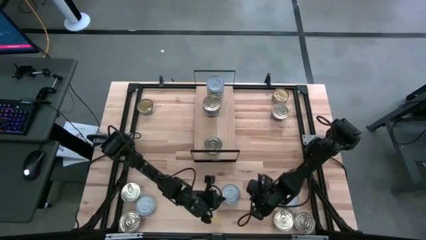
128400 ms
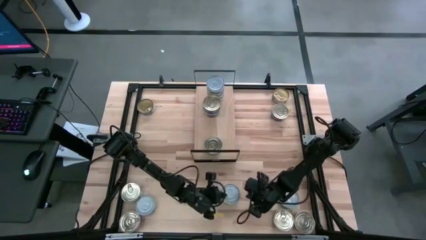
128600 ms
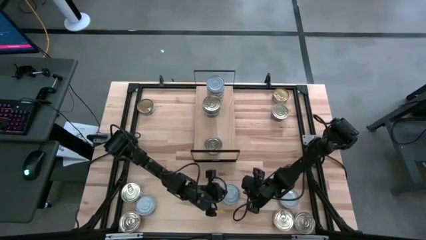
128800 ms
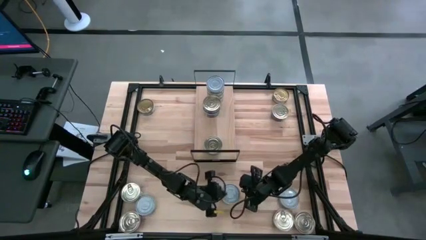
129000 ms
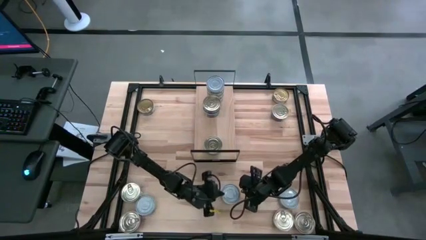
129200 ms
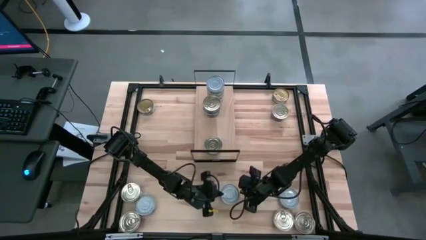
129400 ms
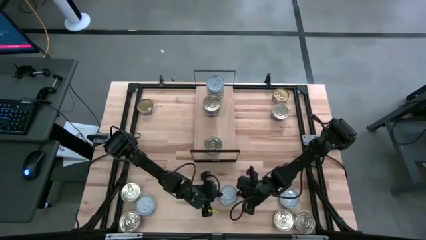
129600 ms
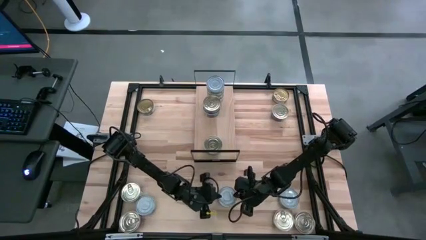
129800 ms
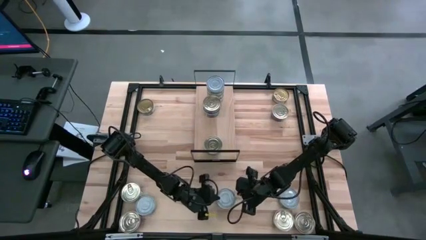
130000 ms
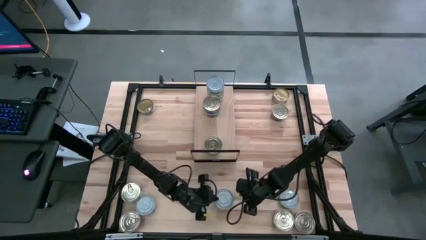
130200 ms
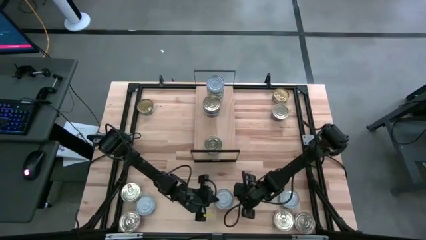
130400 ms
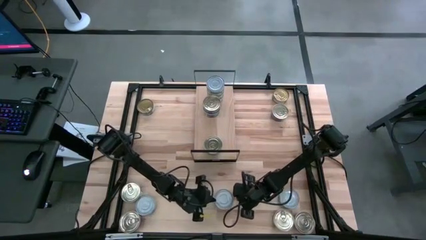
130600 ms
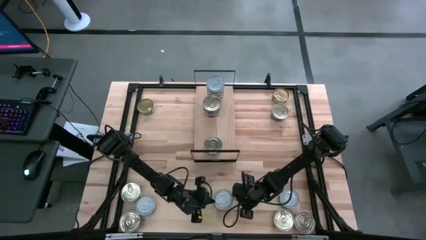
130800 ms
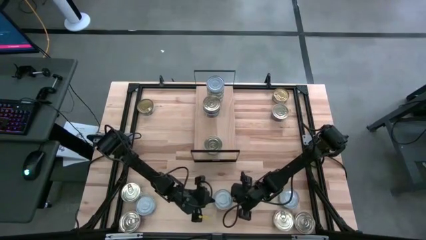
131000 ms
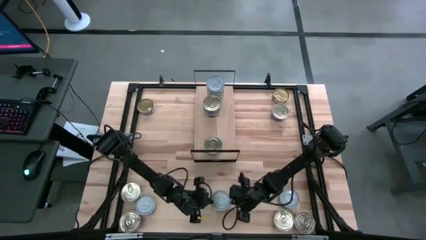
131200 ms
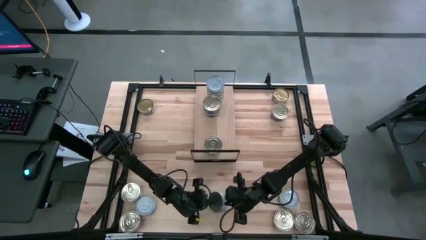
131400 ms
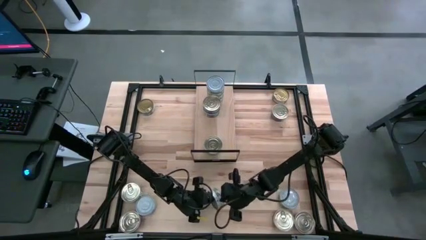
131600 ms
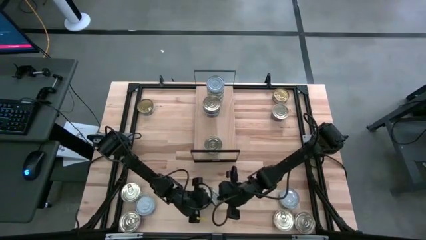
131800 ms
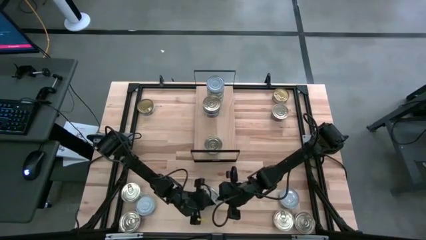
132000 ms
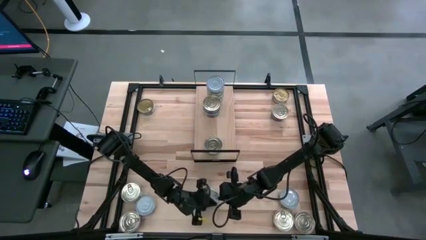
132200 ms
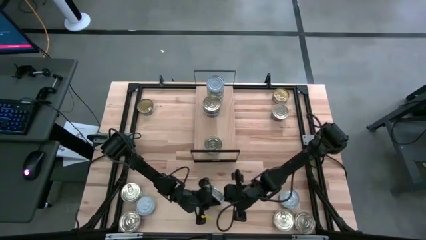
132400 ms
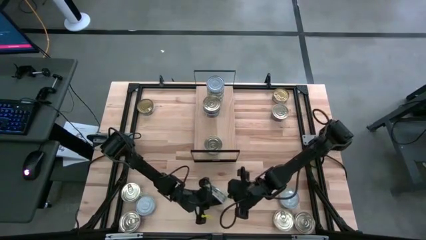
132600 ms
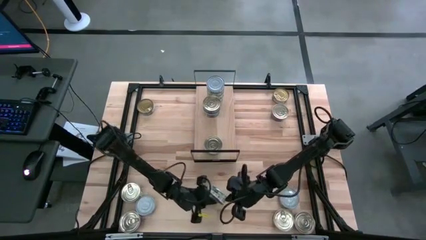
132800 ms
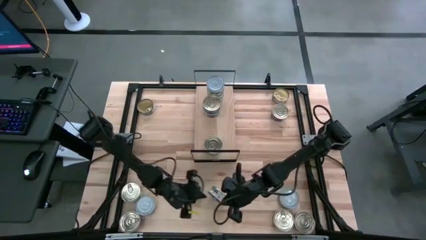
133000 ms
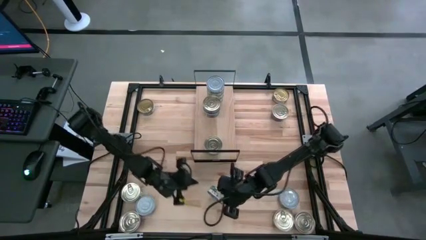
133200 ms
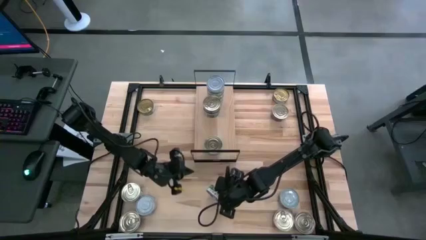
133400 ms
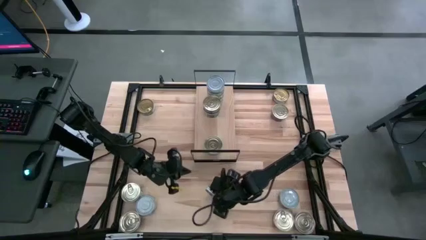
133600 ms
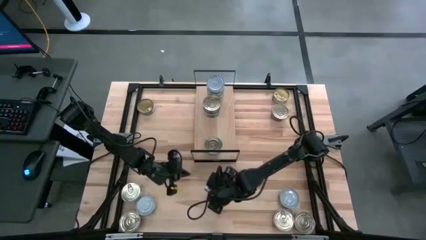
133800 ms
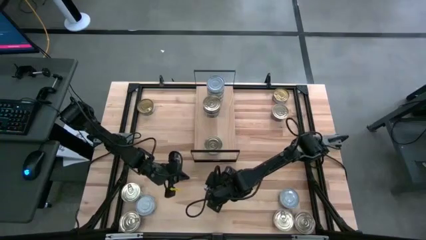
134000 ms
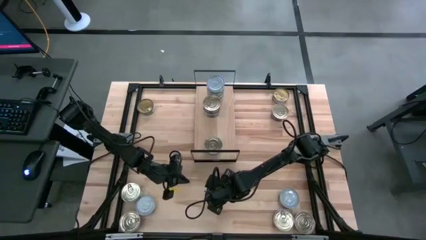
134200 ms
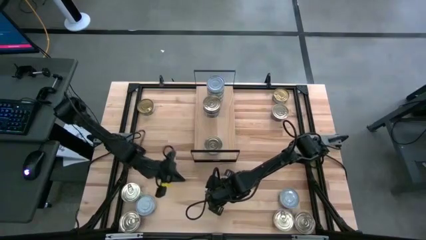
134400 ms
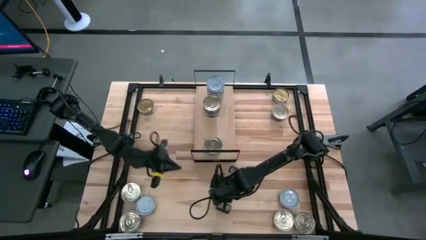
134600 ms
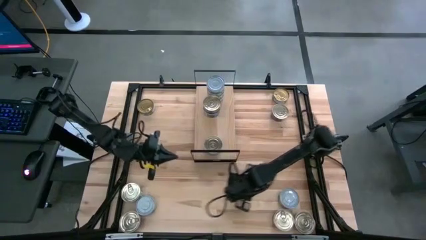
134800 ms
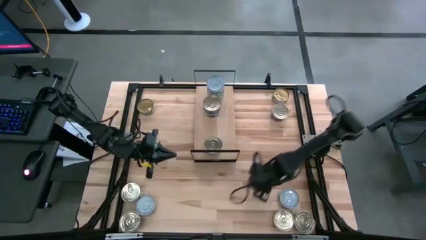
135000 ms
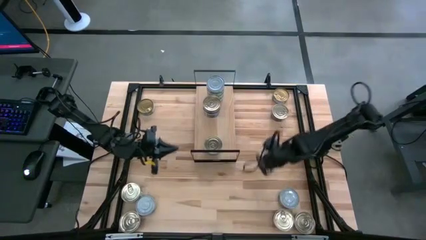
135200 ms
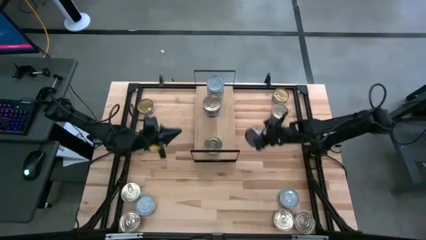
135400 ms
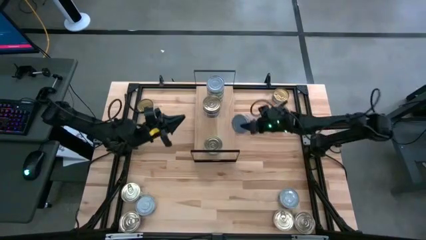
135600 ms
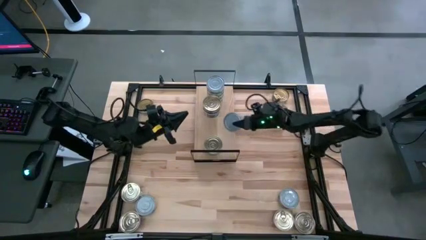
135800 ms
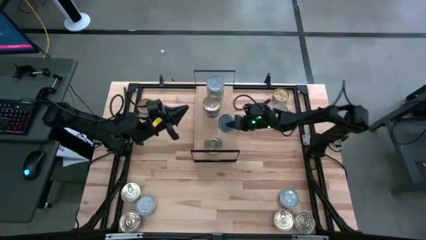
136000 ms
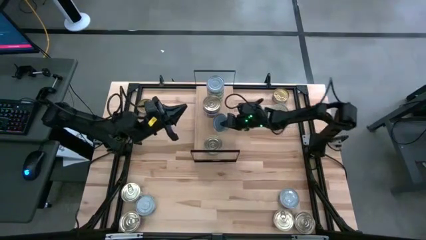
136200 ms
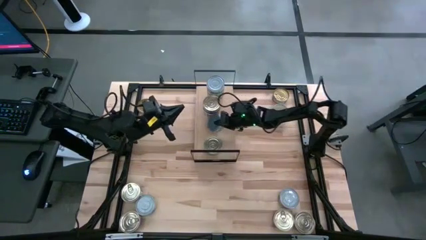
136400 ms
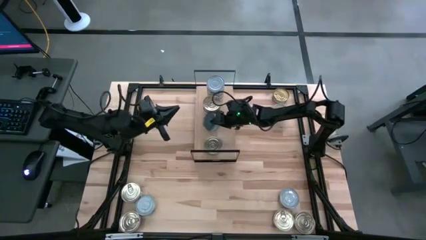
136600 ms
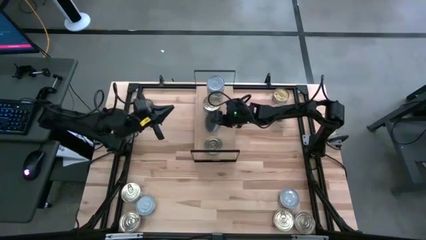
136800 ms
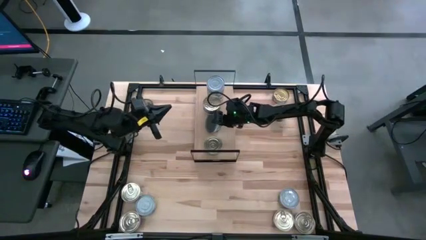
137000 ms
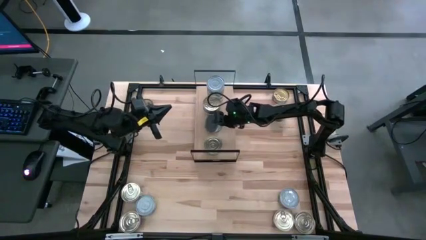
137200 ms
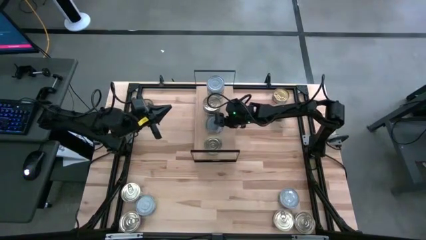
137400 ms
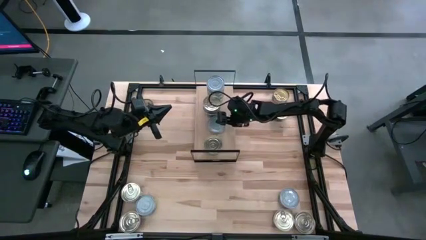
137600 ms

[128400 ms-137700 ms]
Task: Stack canned seafood by type on shelf
Put the green tuna can on the shelf the aligned with the pink and blue tuna can

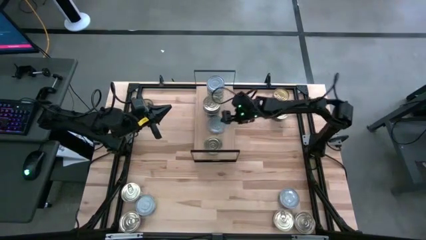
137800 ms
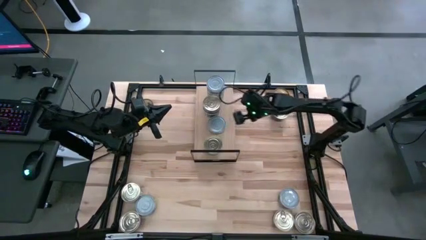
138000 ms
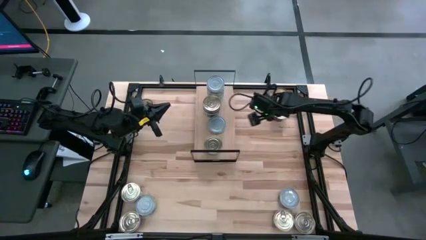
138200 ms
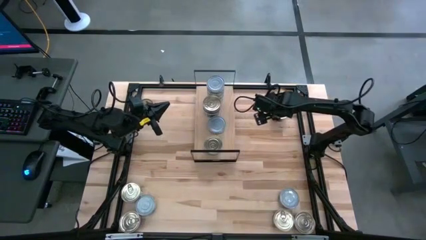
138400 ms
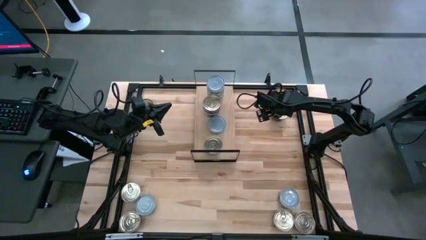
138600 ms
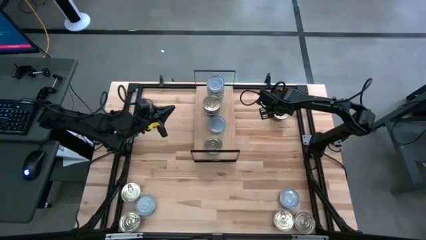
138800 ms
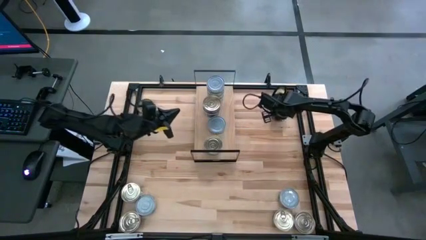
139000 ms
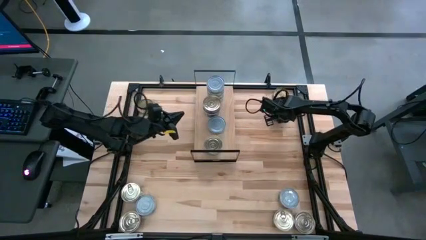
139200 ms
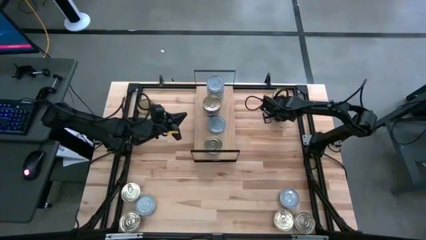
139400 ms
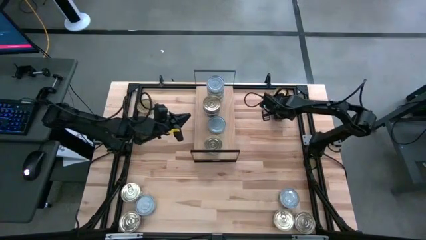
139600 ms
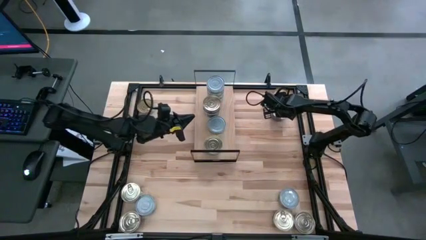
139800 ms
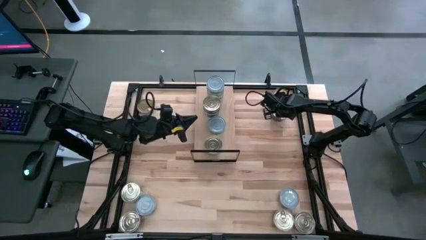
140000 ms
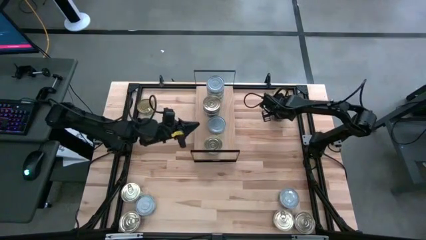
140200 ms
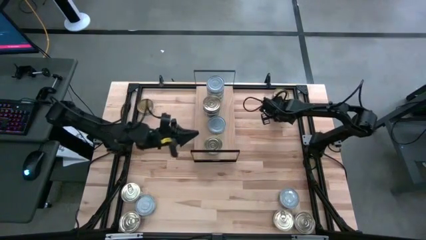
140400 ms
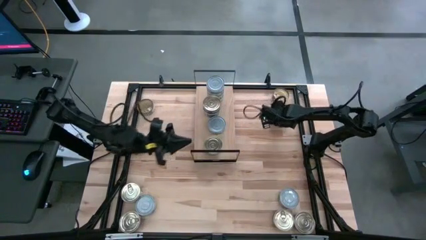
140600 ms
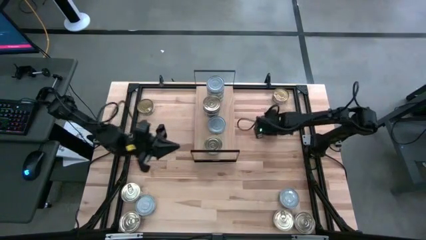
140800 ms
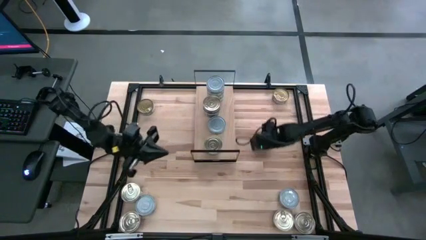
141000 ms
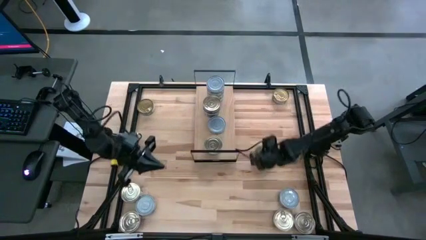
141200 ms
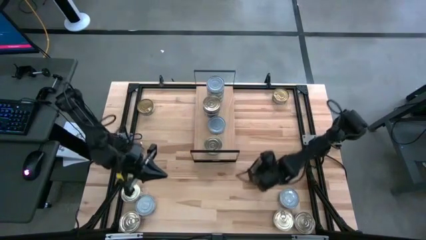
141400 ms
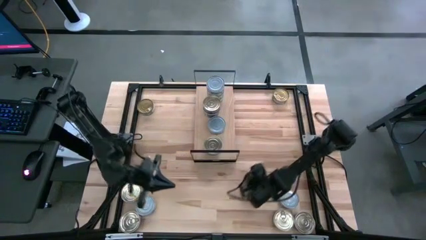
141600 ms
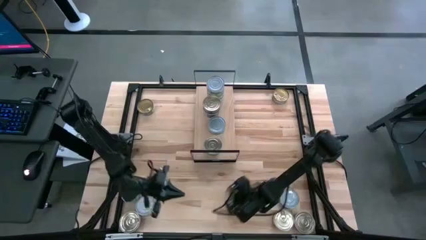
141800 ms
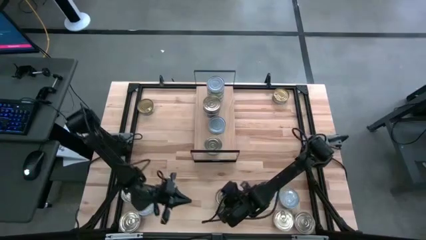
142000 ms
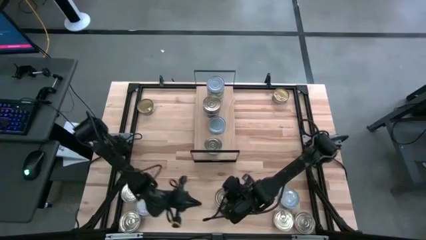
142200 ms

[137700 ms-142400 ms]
Move the pink and blue tuna can to the bottom middle of the table

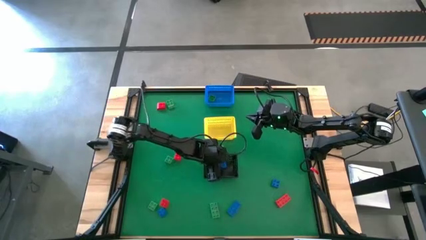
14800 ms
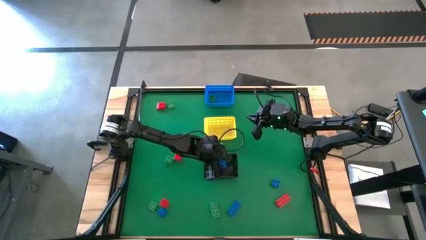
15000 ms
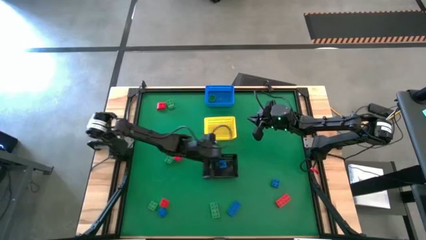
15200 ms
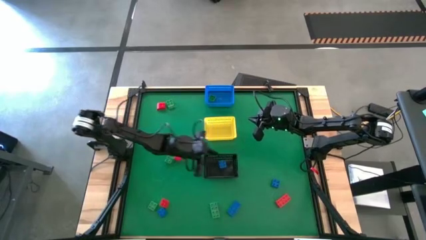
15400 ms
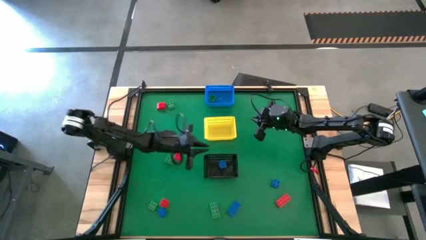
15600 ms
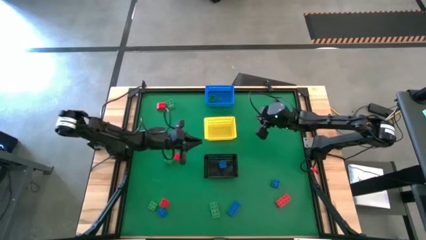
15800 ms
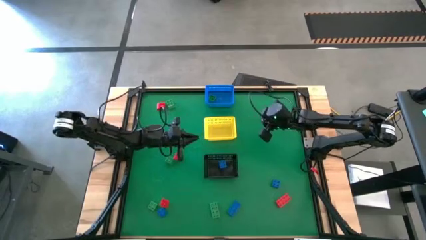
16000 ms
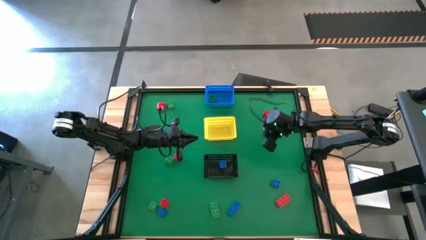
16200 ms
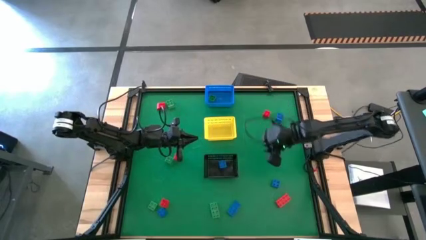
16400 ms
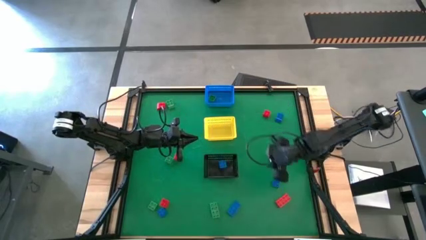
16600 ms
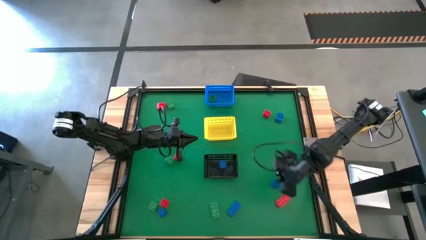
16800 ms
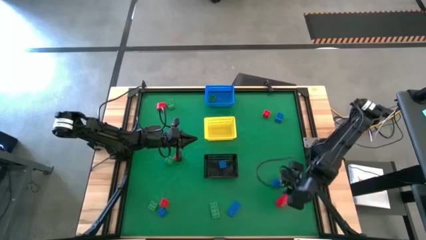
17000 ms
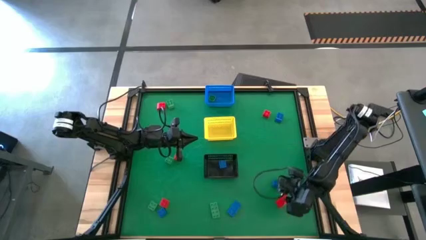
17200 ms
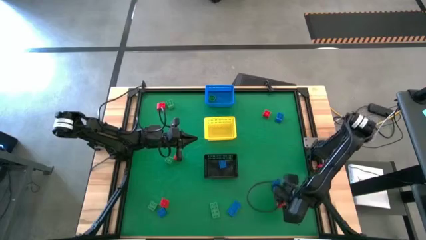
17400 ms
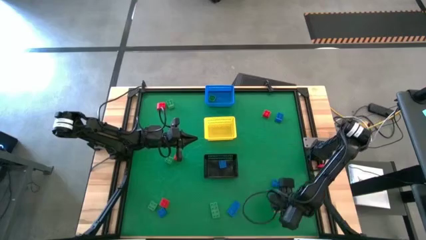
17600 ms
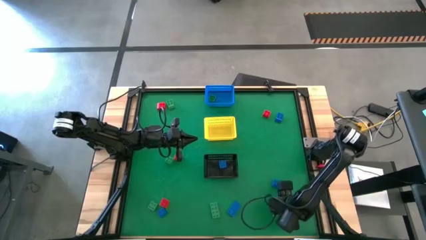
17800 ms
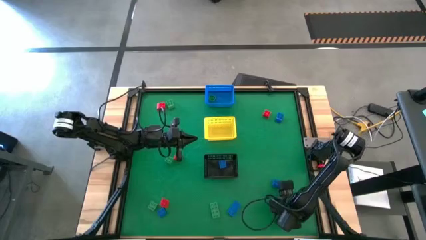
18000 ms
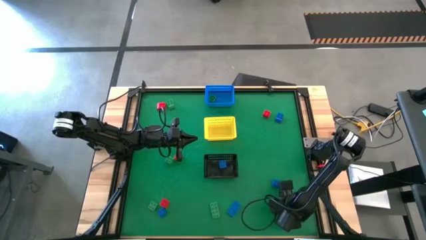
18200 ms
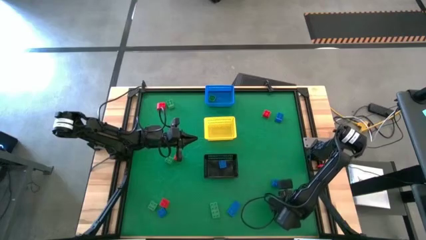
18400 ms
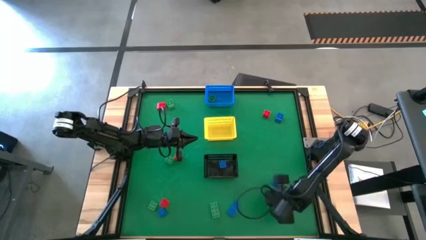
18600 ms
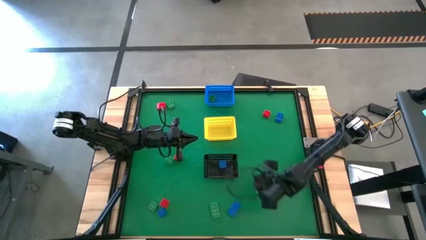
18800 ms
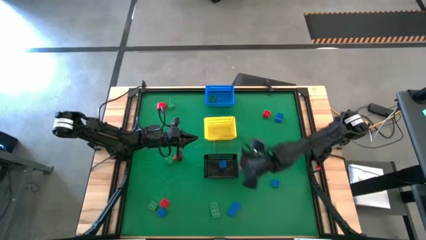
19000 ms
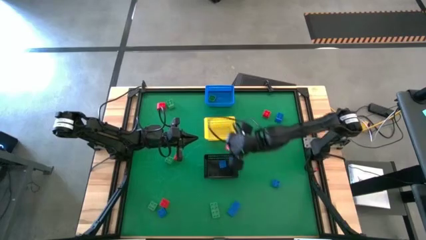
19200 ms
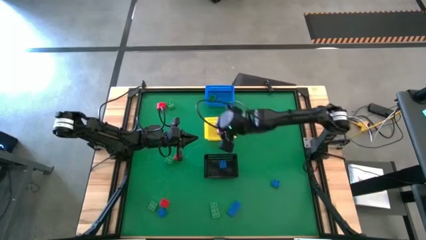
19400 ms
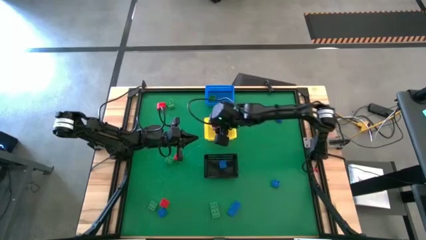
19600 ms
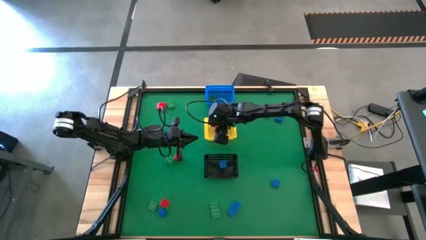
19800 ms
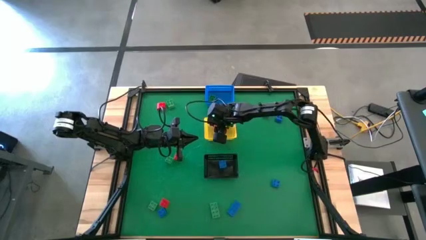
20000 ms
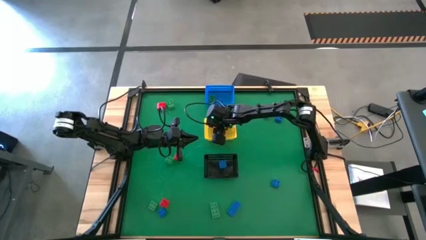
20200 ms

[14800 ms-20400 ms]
Task: Sort & place blocks by color
Put the red game piece into the yellow bin
